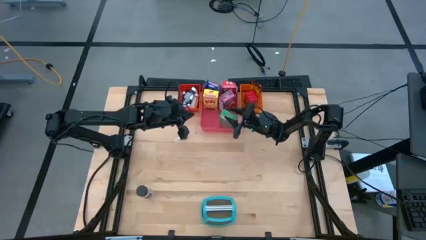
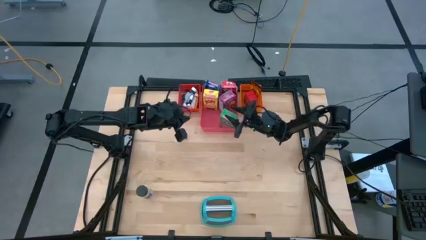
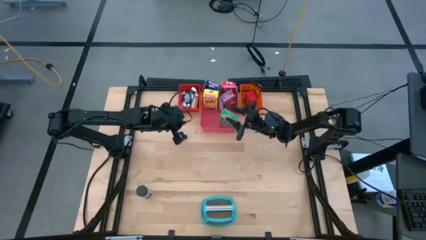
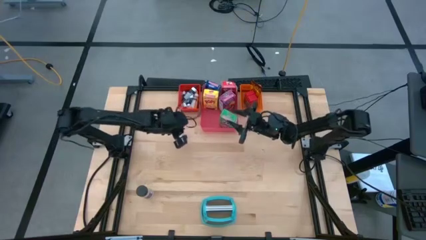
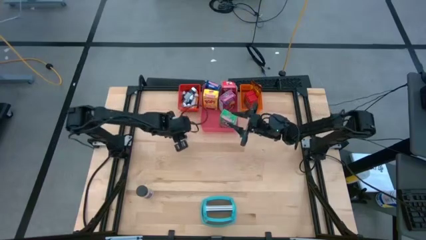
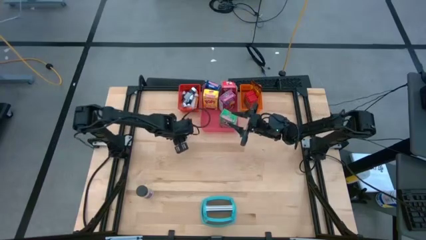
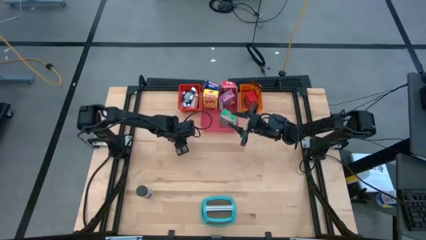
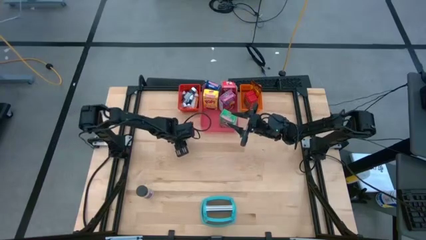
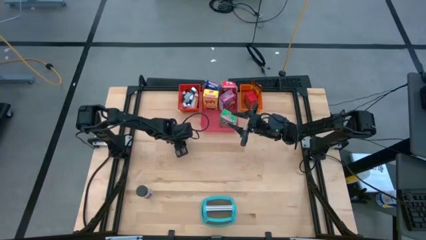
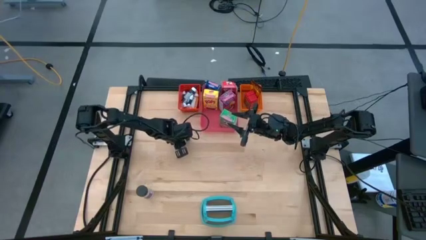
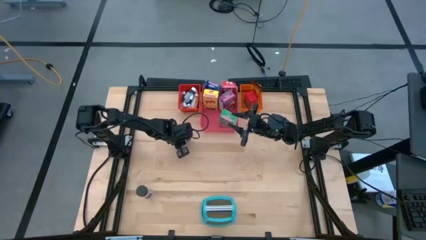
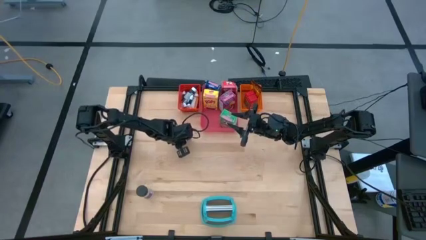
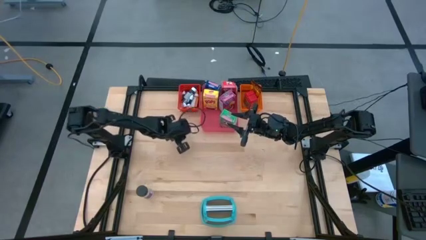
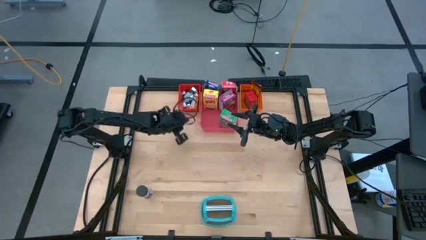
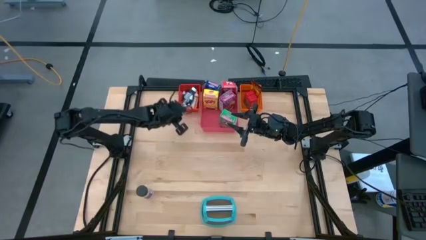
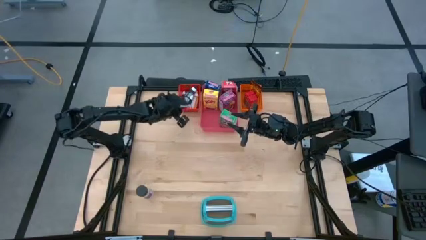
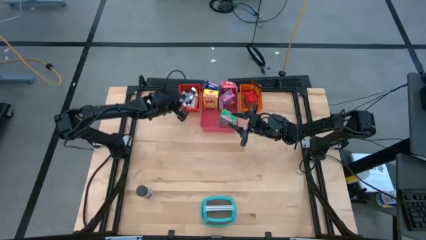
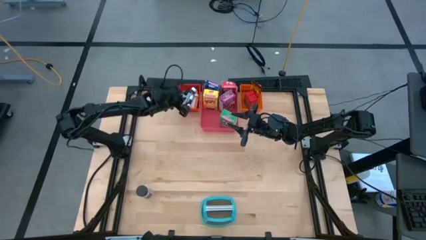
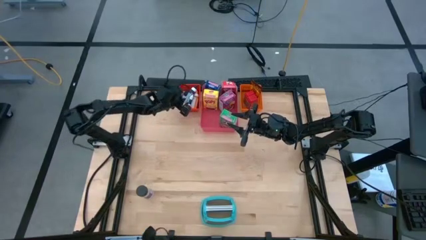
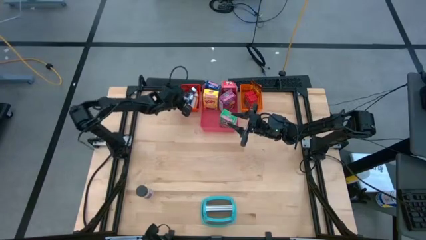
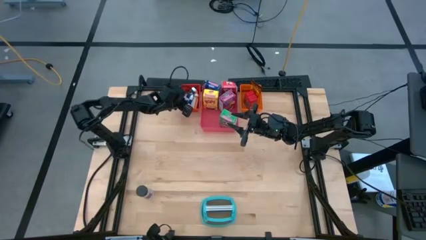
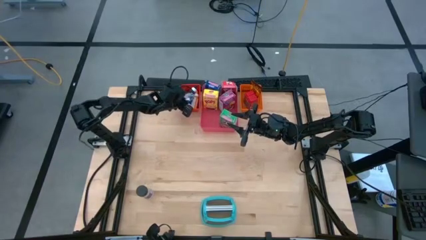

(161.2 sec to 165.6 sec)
Task: Pick & Place Kitchen Items
Put the small brown food coloring bottle into the red bin

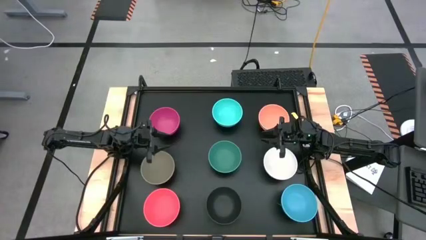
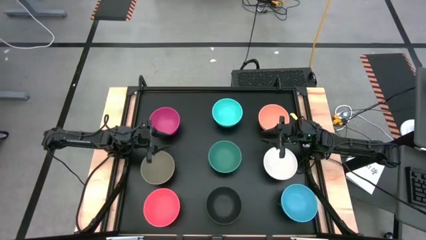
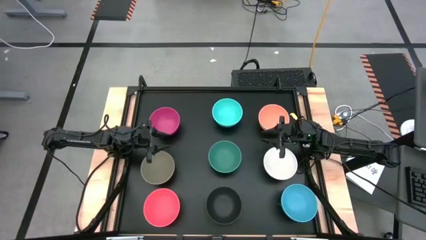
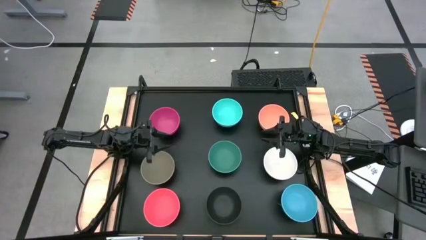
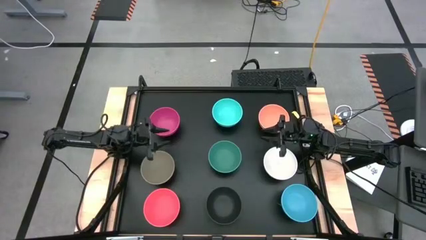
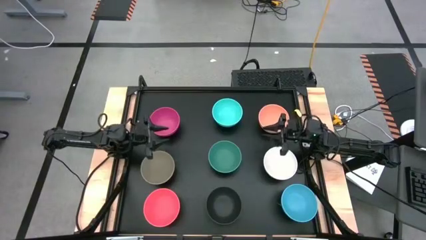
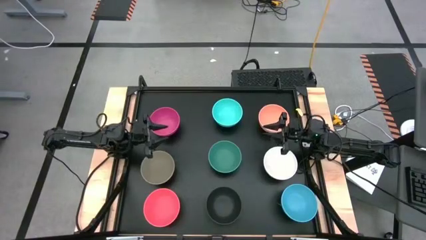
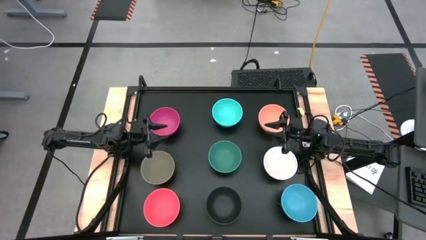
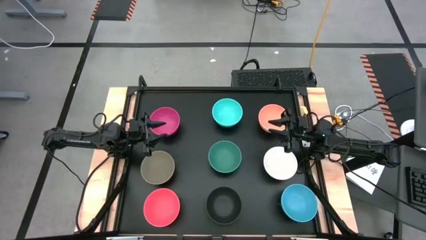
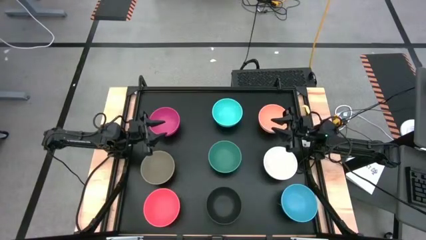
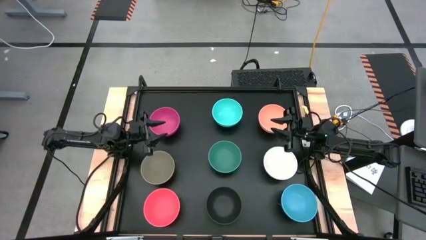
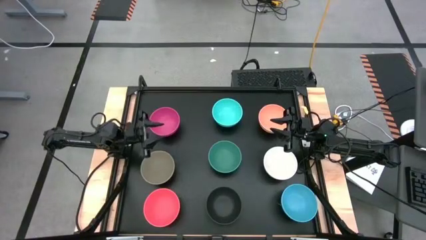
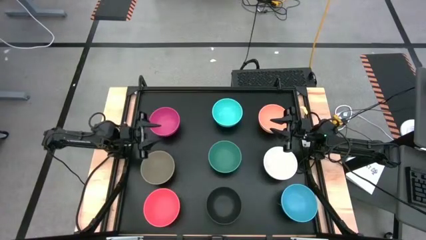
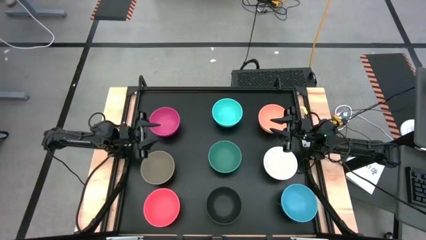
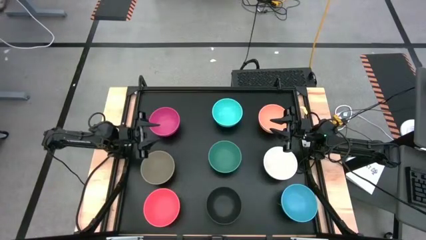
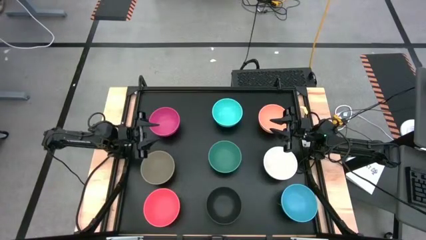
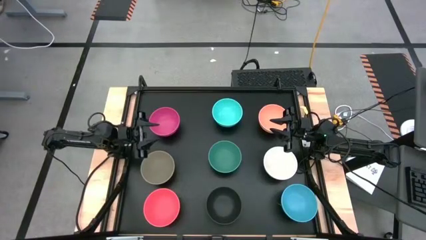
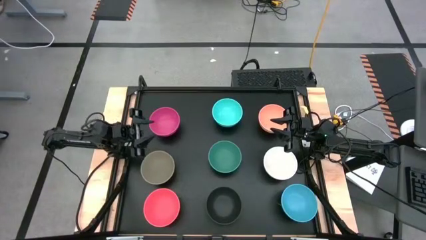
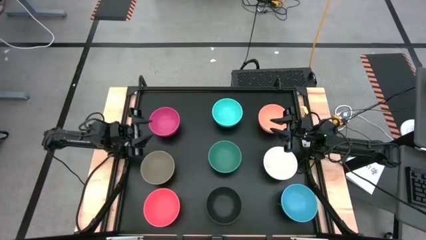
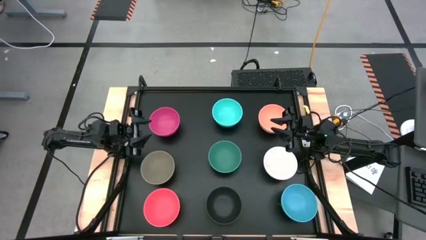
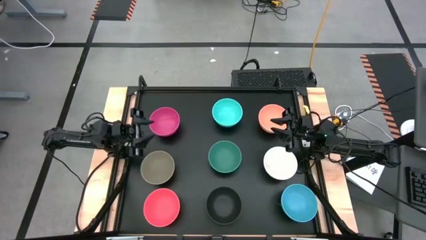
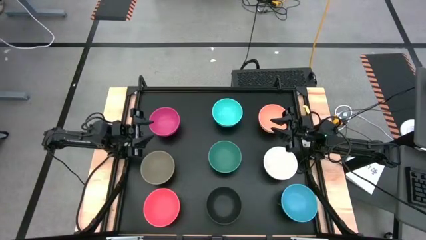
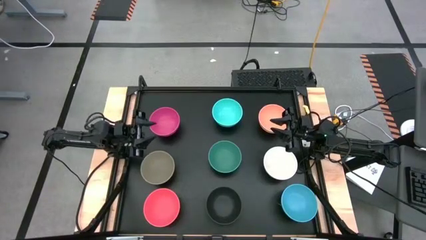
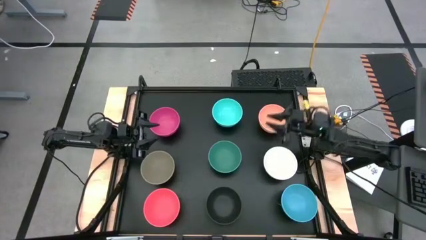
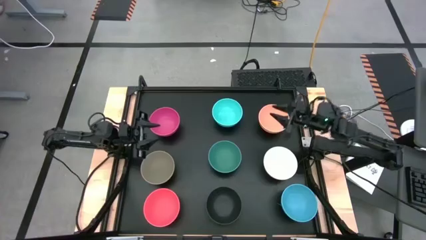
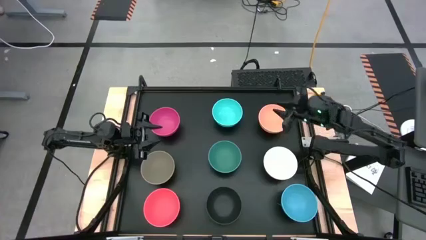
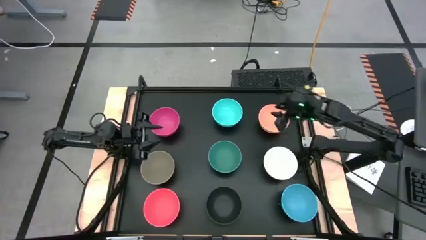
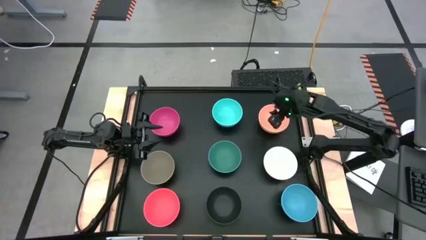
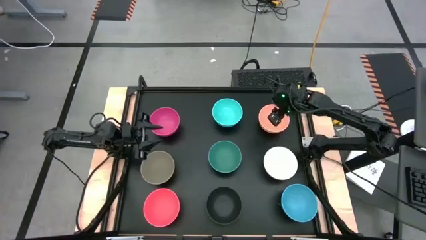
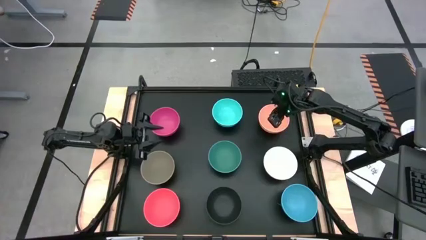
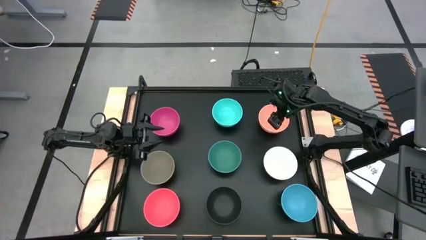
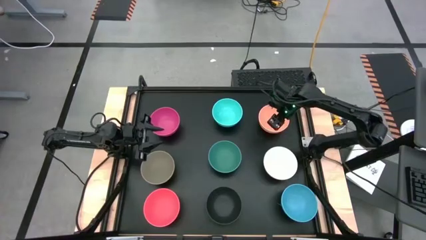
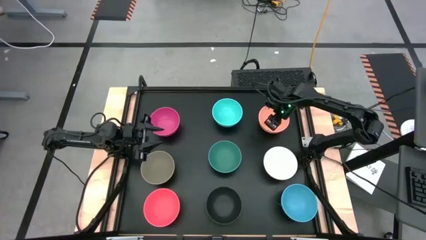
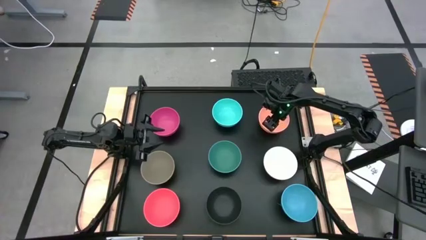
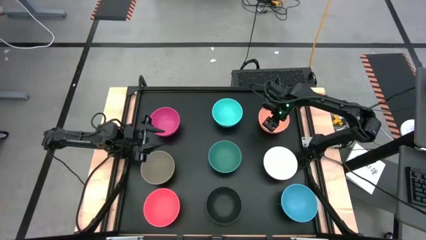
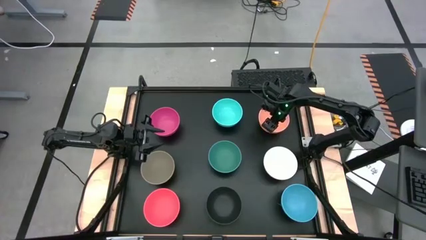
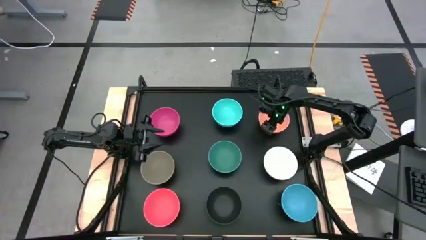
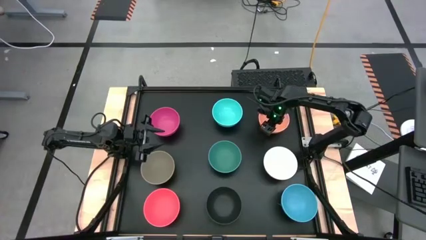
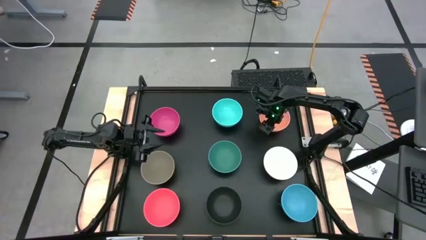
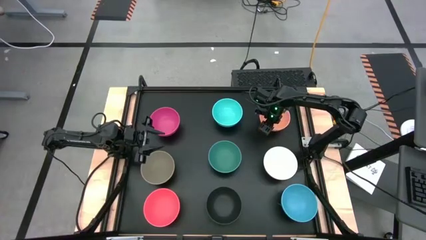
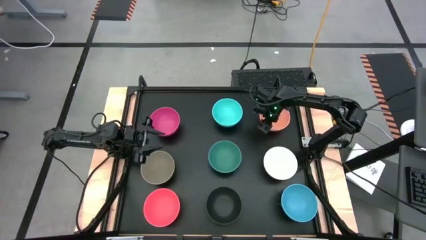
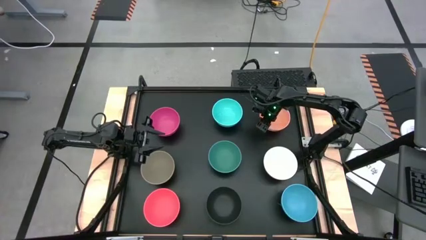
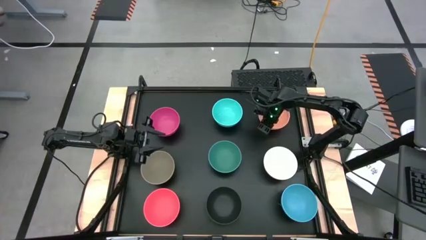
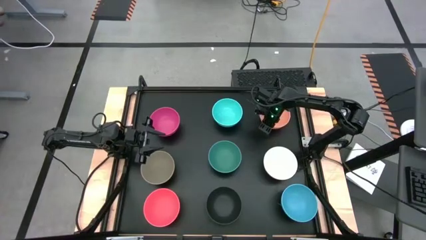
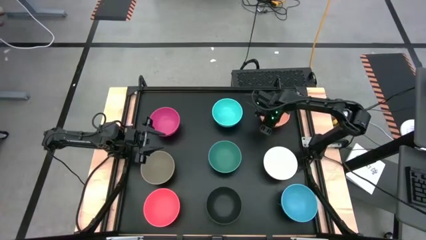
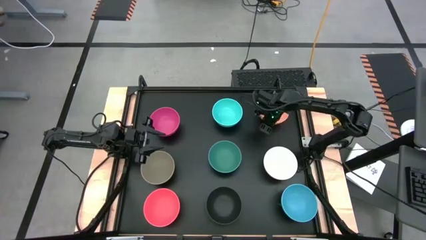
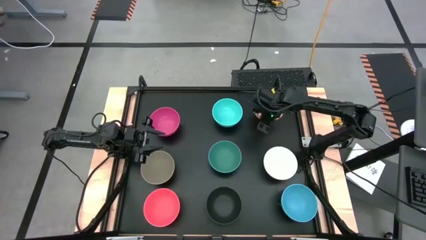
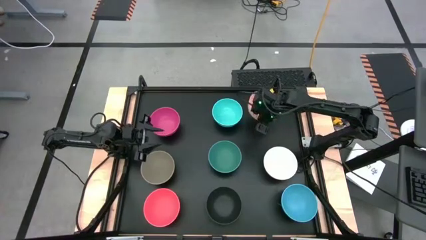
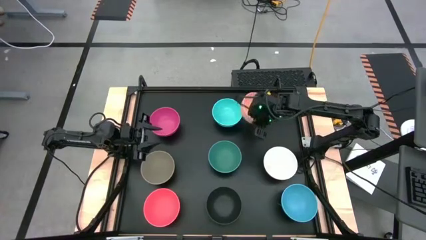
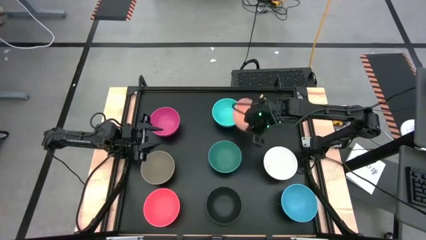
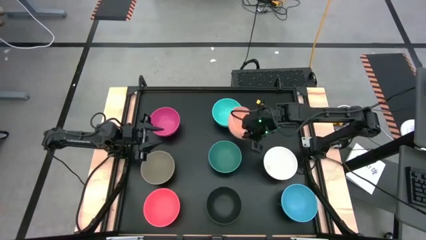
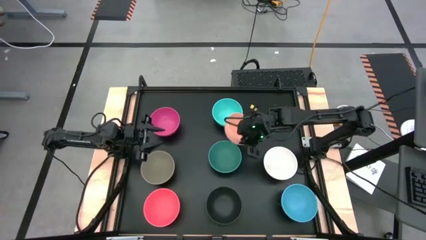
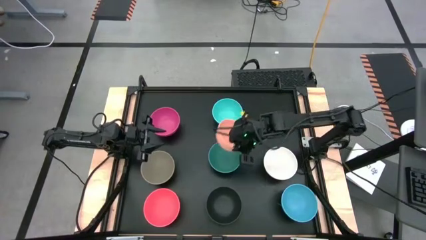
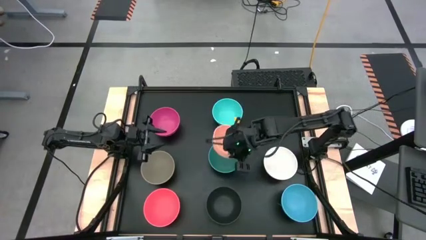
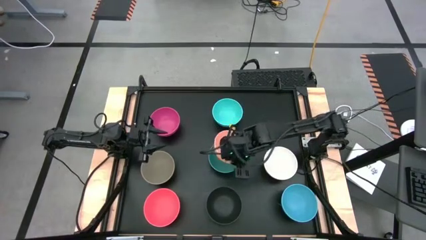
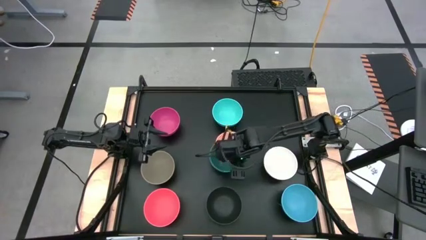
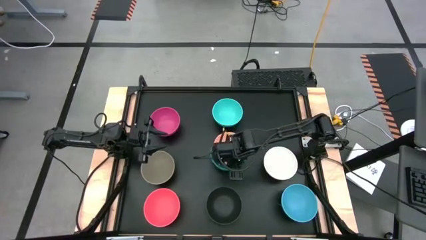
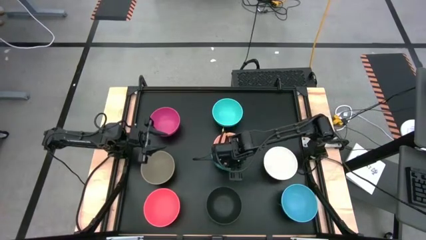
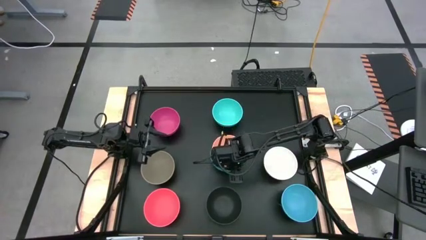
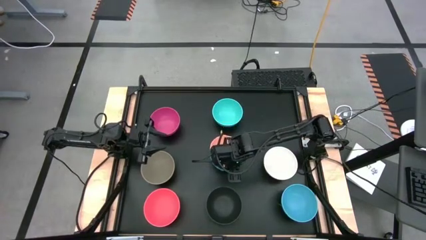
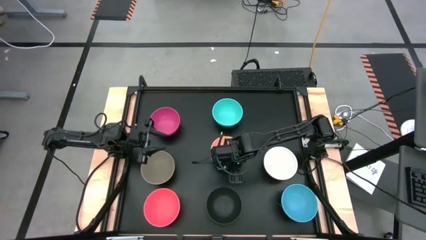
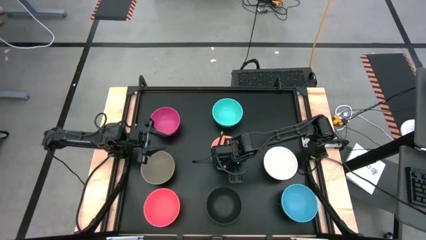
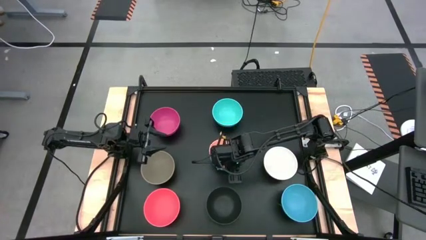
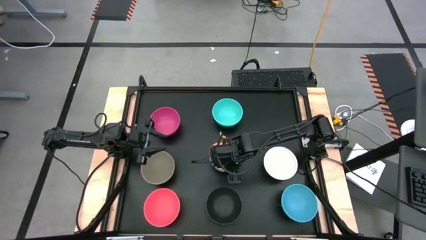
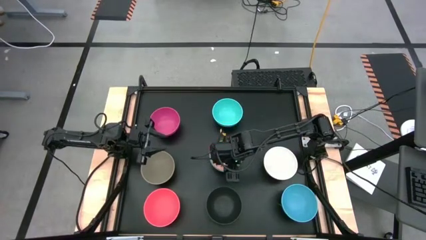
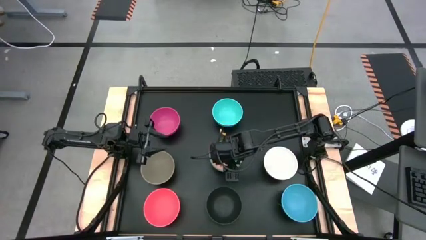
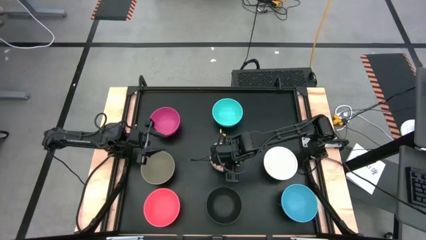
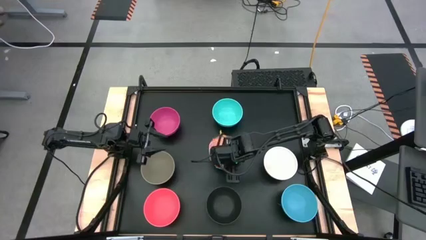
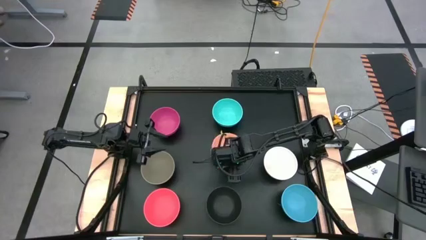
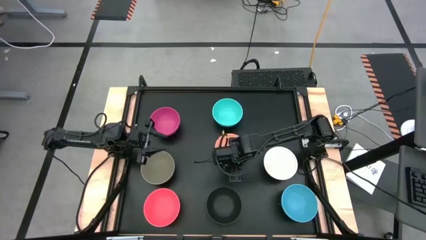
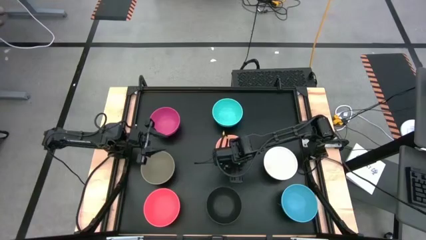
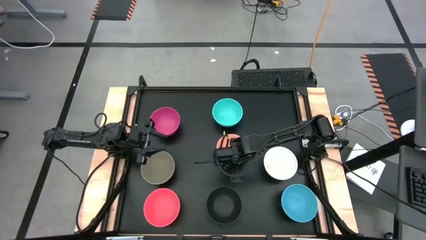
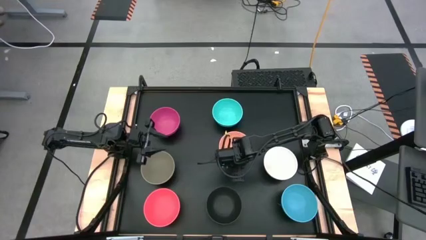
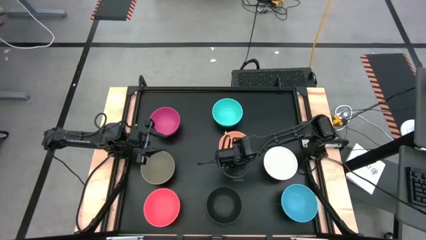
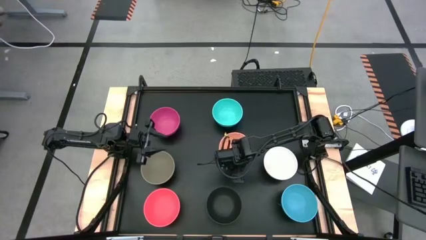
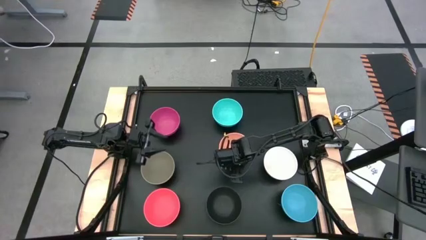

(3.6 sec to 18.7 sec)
Task: Nest bowls inside each other
Stack the light orange bowl on top of the green bowl
